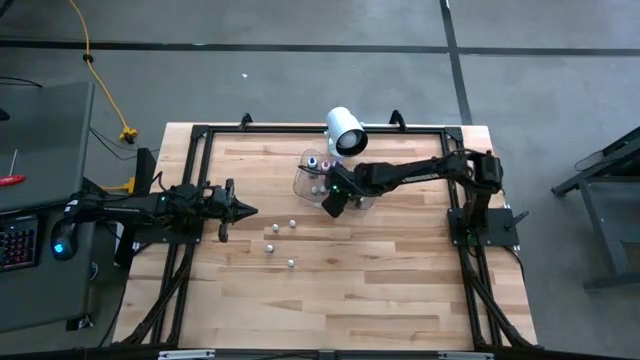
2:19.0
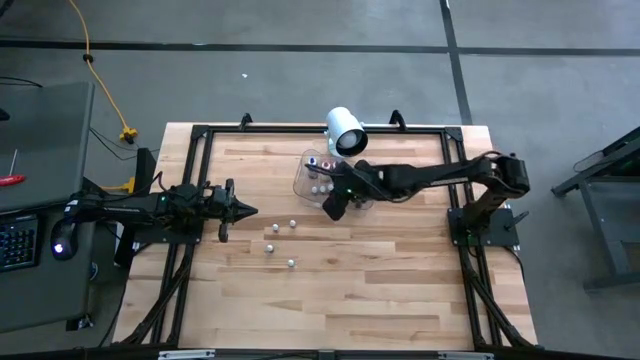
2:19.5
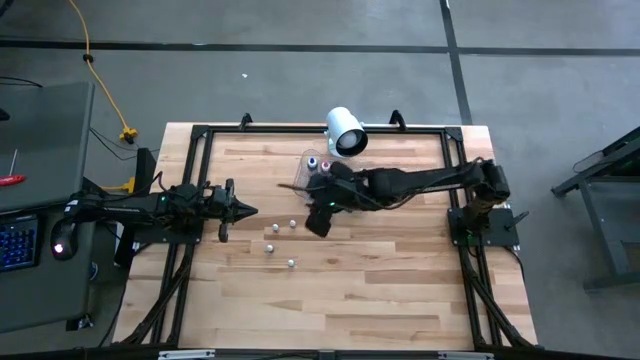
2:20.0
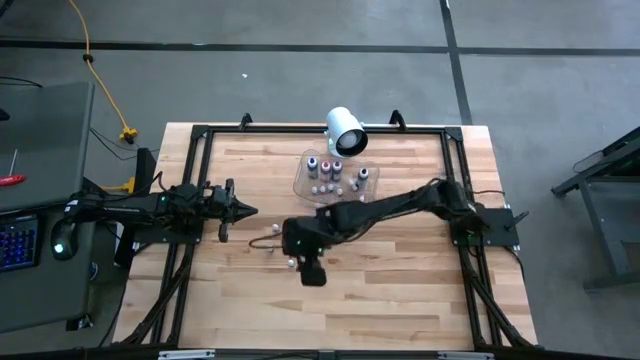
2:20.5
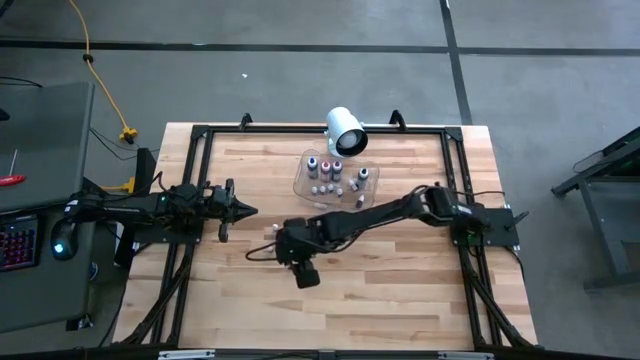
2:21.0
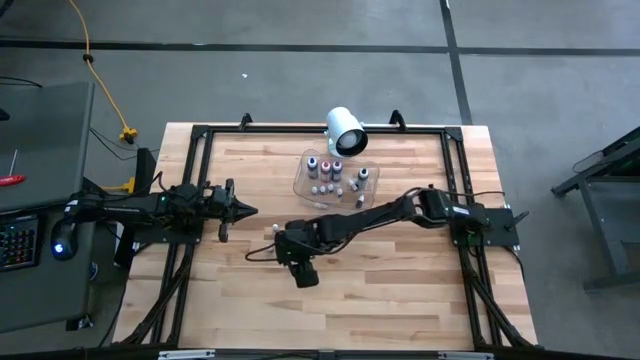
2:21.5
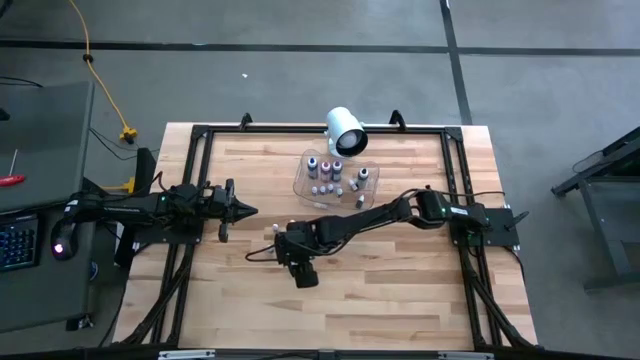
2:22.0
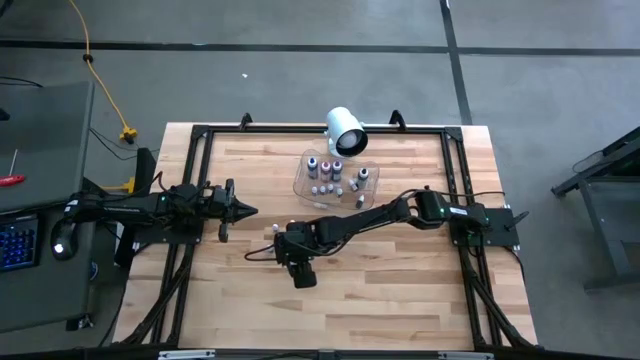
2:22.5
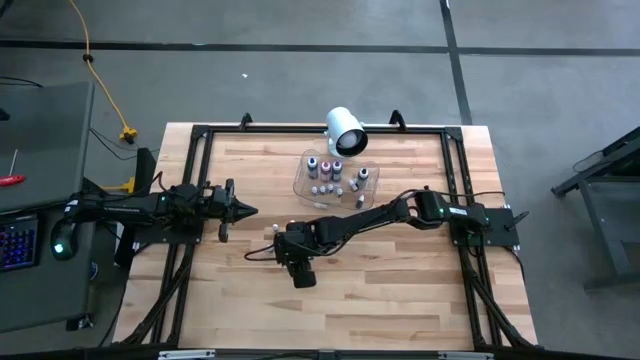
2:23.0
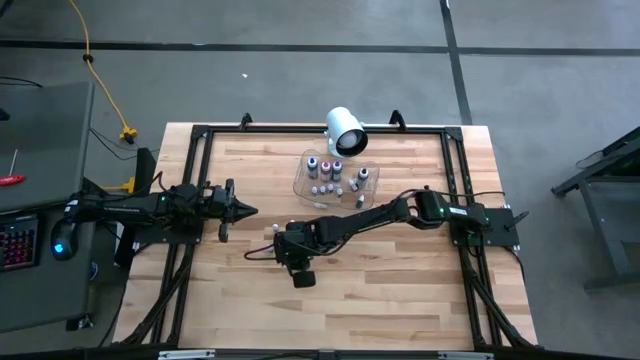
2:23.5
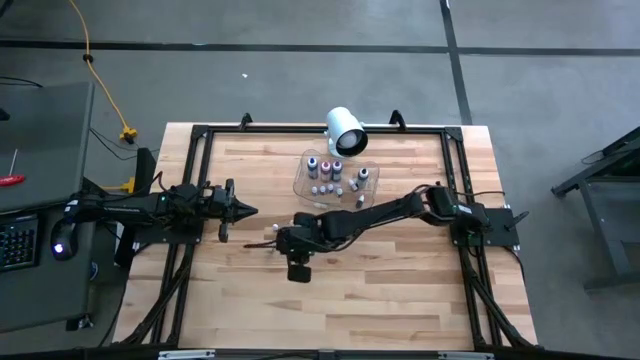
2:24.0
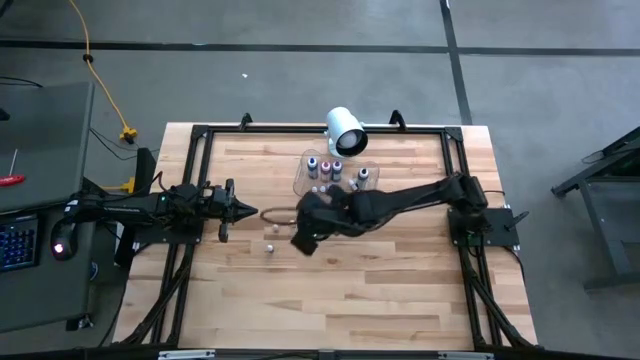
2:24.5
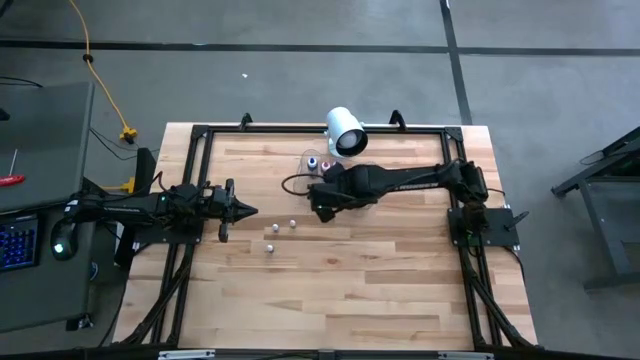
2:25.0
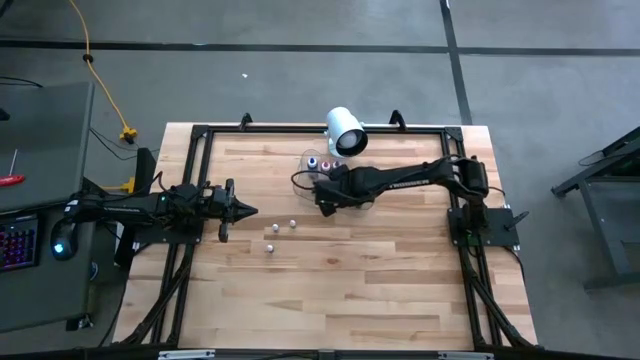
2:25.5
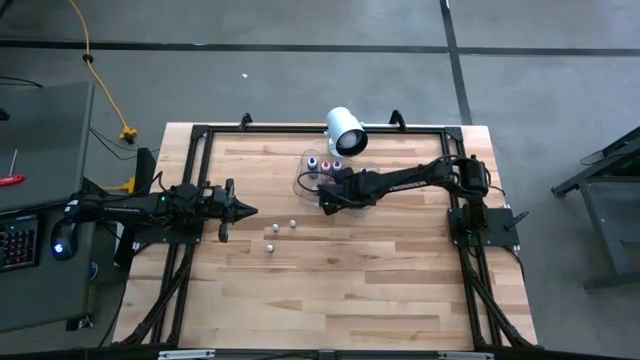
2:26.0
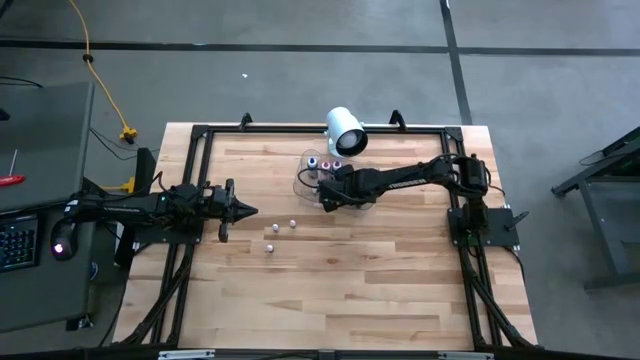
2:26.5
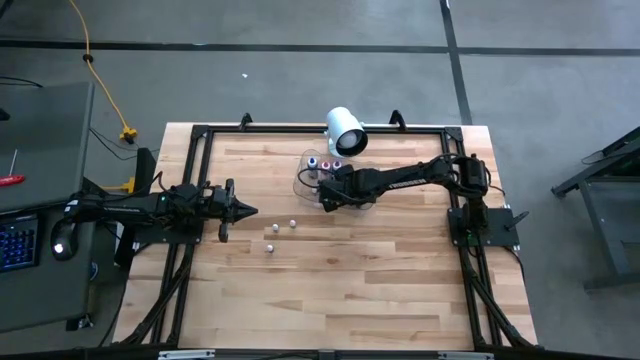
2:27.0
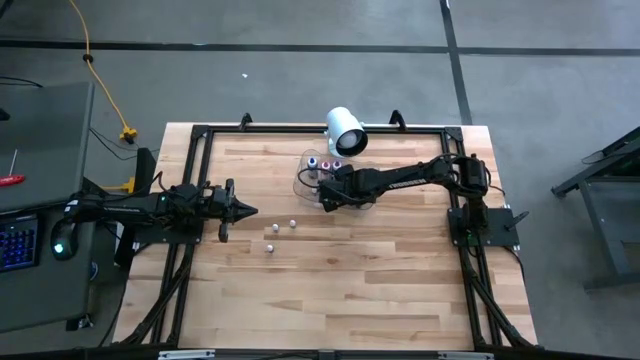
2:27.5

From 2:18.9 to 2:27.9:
Task: Pick & Place food coloring
Put the small green food coloring bottle into the transparent bin

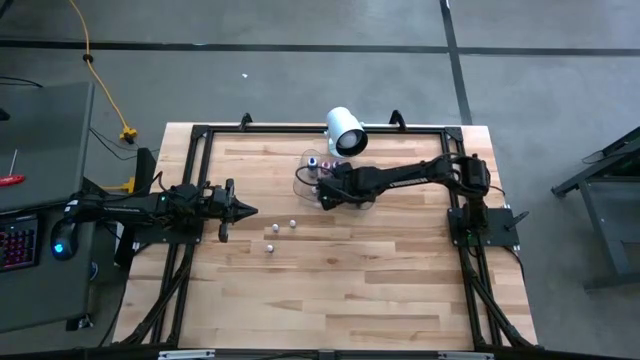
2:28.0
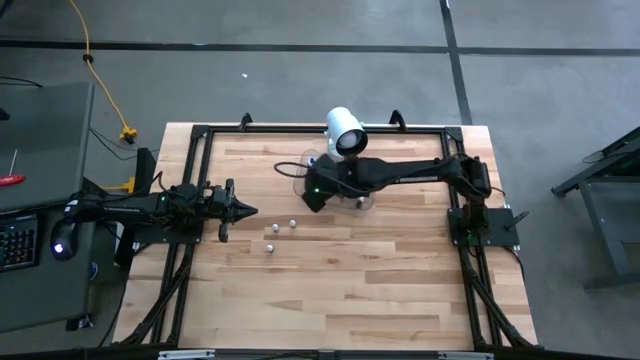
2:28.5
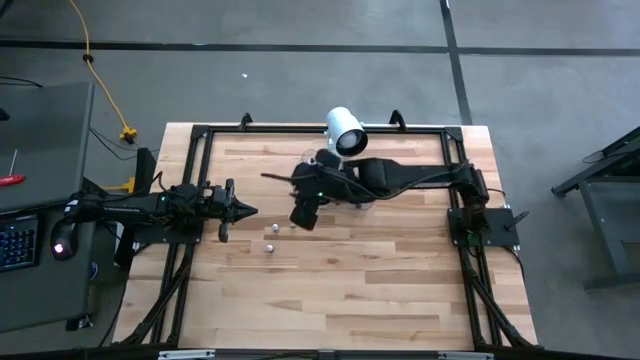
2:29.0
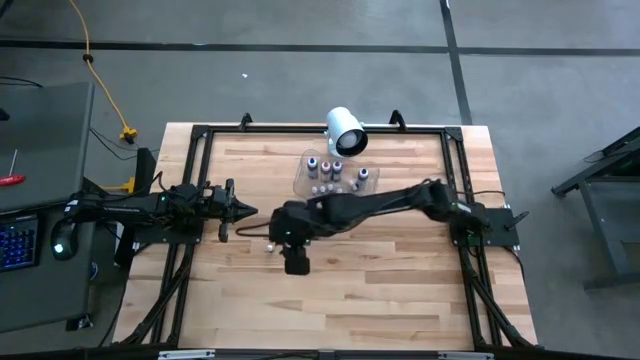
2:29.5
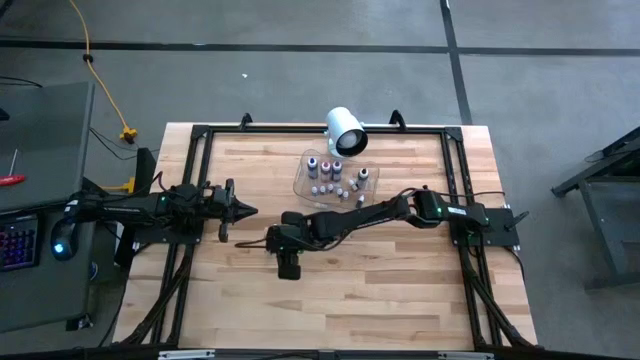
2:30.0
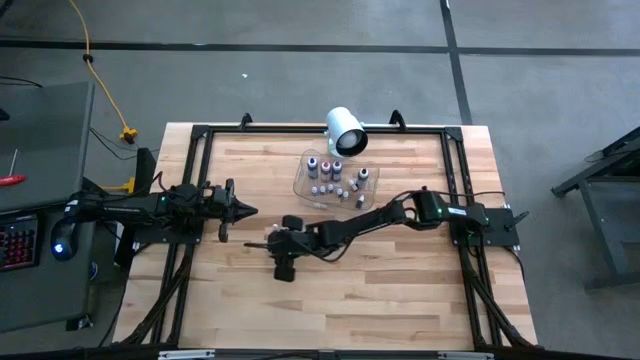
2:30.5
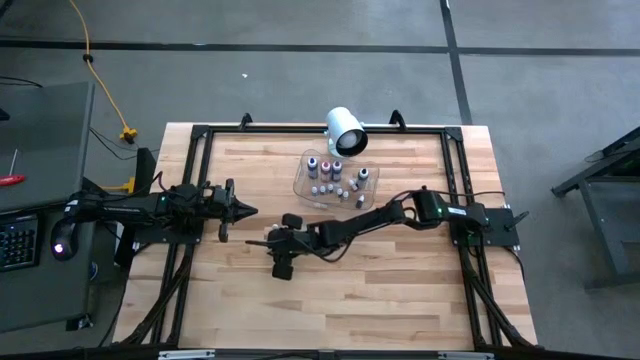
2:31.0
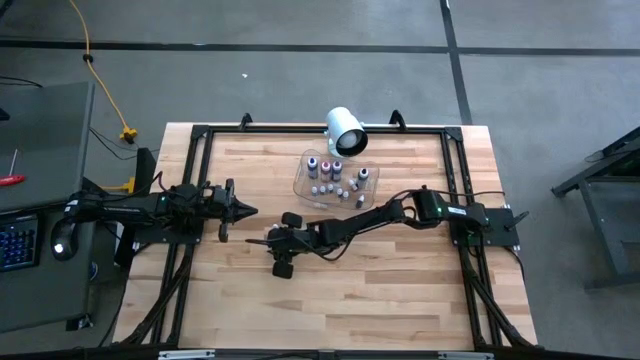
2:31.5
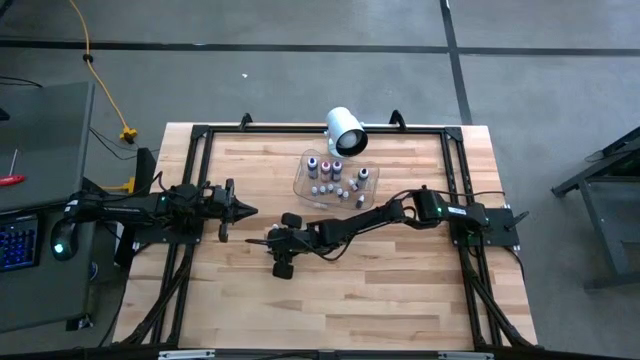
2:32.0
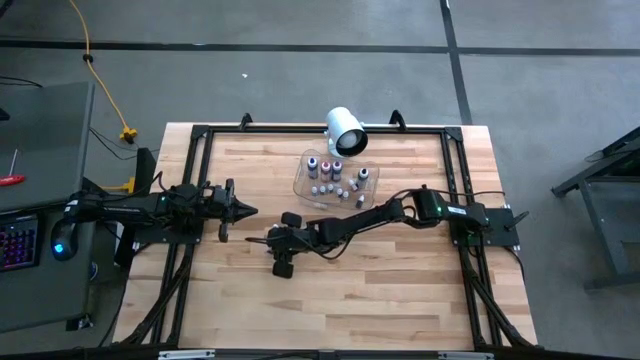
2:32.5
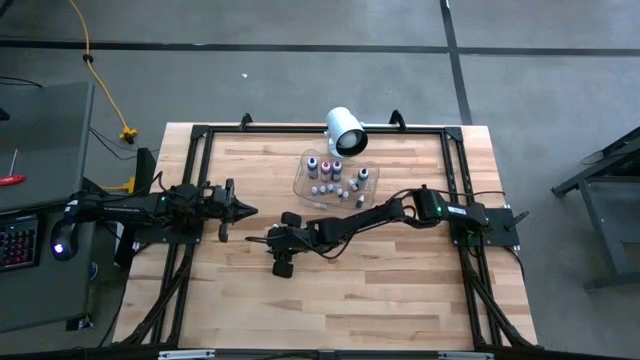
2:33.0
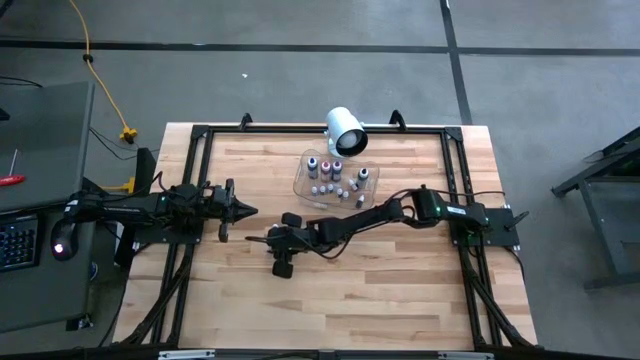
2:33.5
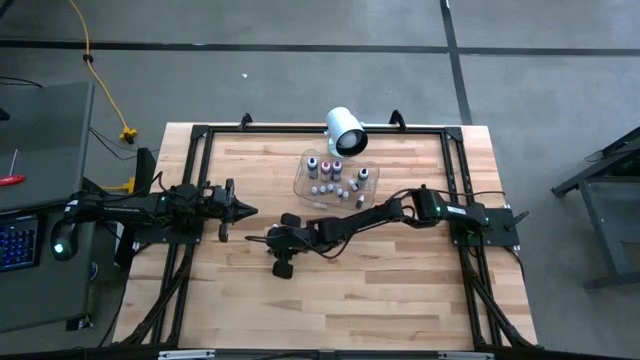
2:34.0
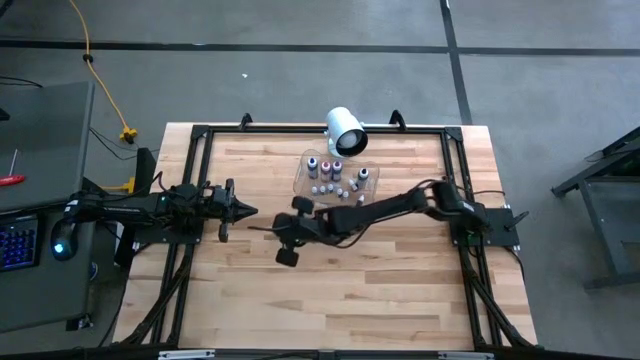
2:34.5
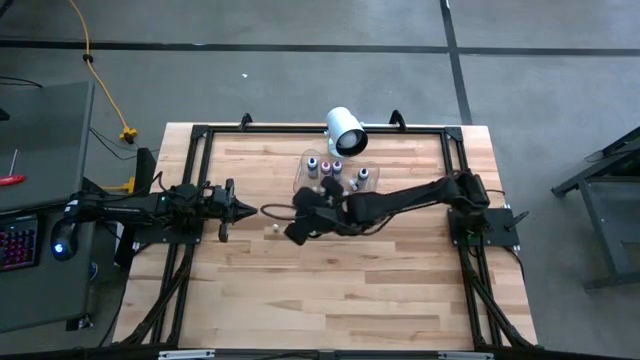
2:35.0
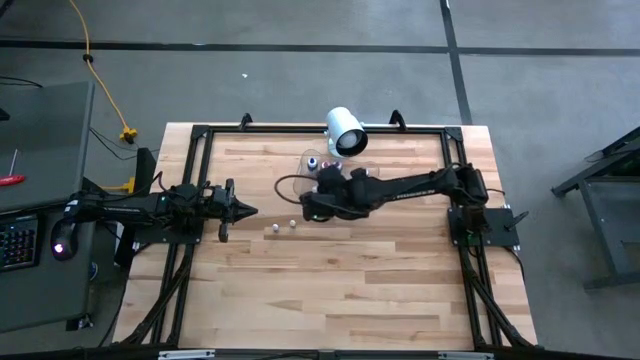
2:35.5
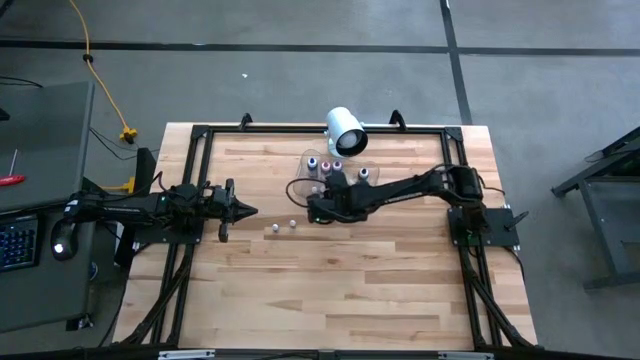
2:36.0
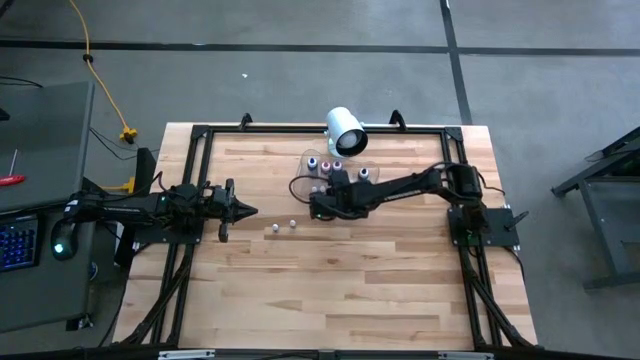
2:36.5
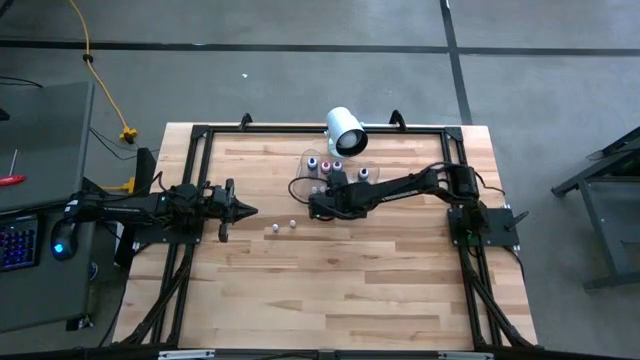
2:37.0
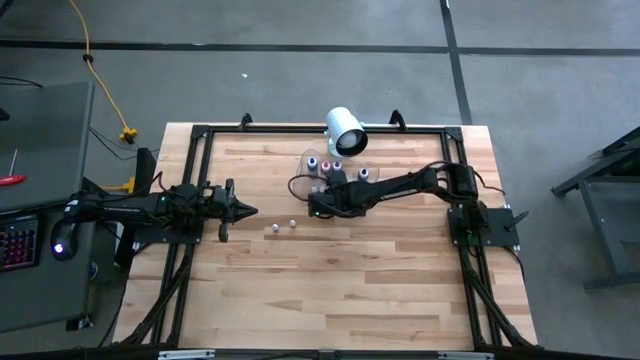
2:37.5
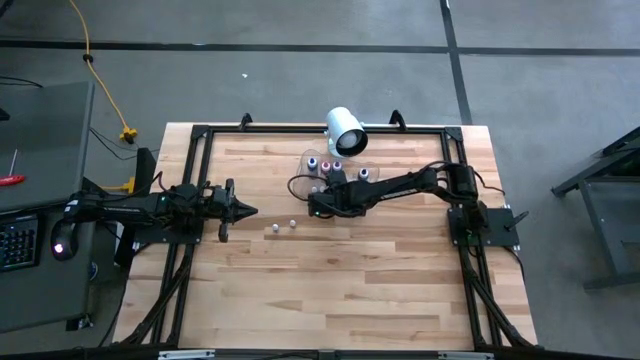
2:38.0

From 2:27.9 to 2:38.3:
Put the small black food coloring bottle into the transparent bin

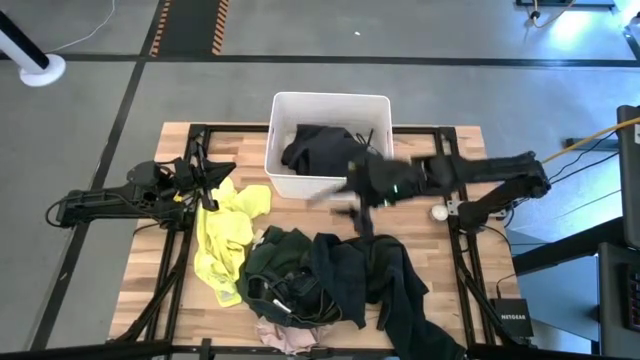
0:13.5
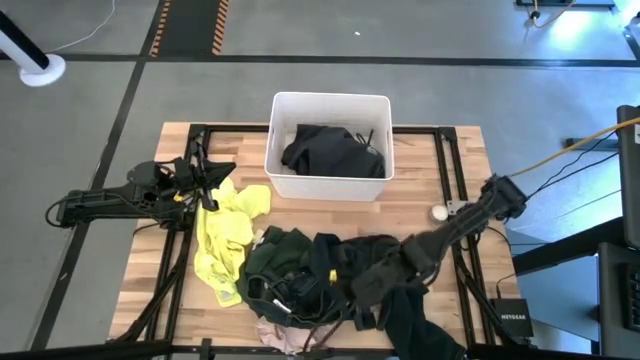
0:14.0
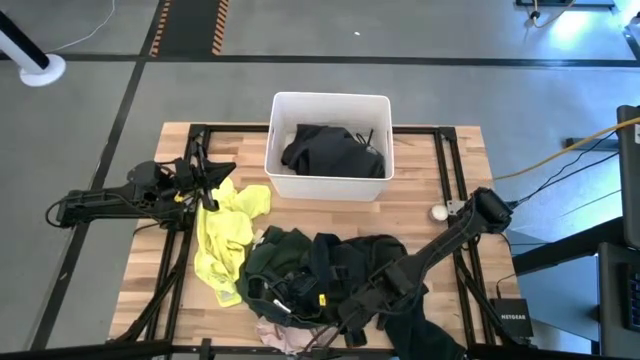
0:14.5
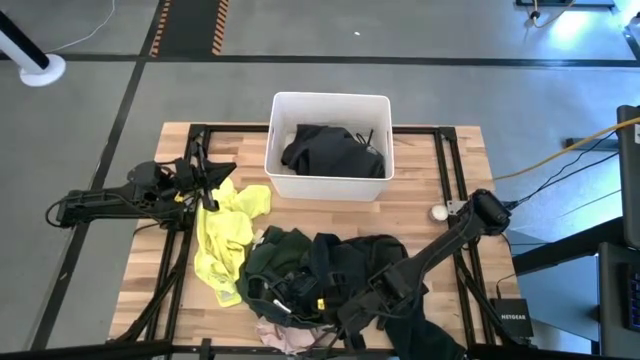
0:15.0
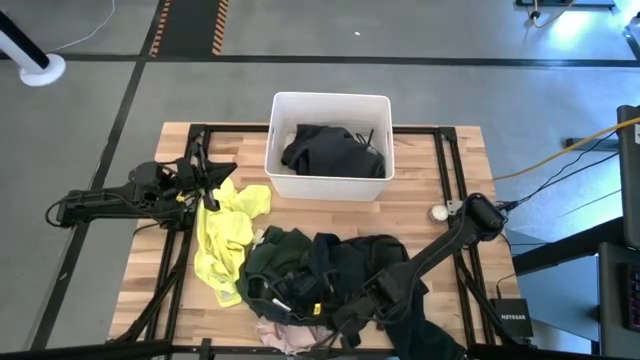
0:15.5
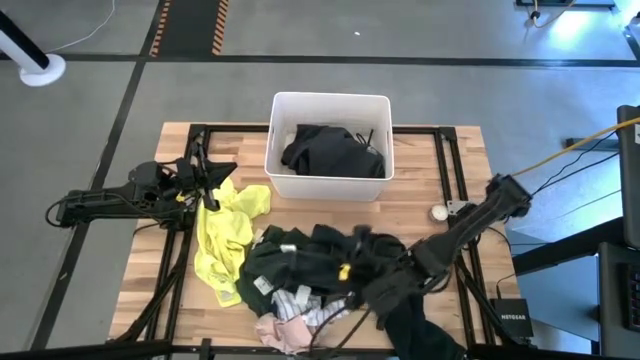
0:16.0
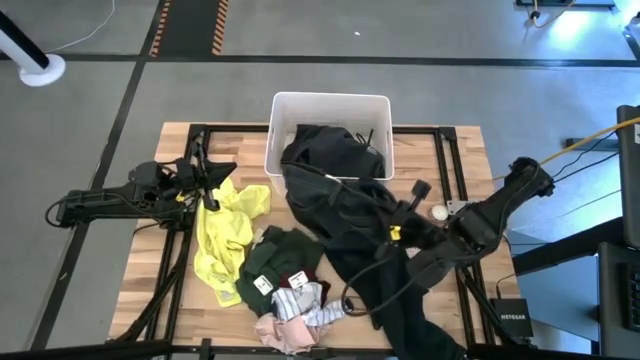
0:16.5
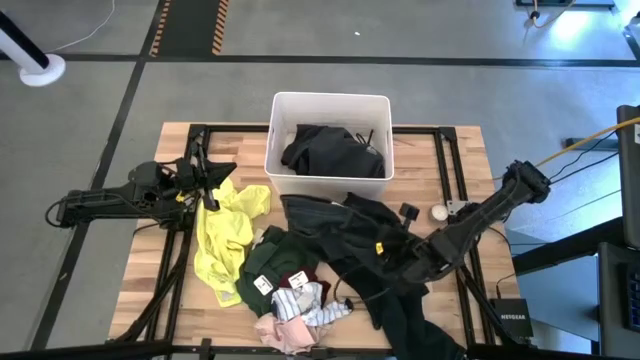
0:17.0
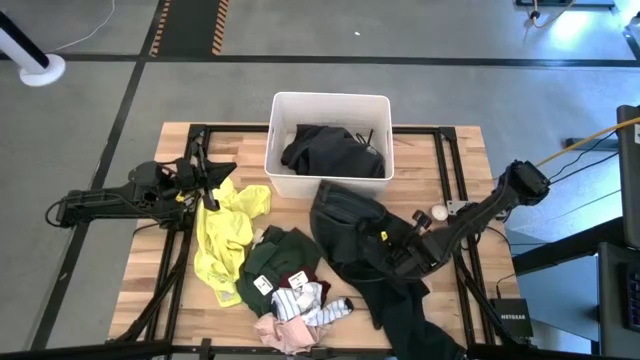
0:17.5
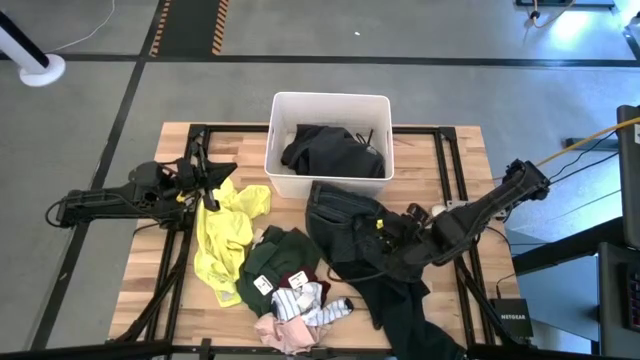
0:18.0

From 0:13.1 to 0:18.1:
Task: Sort clothes
Adjust the blue pants
